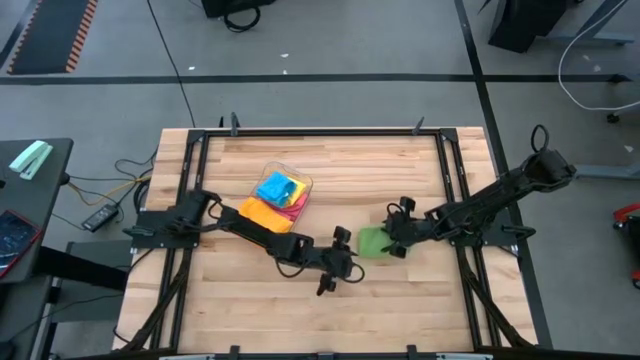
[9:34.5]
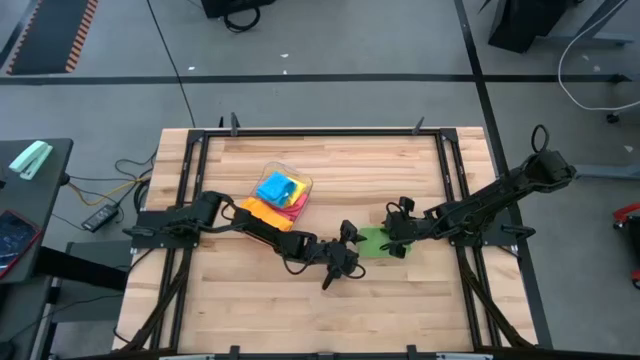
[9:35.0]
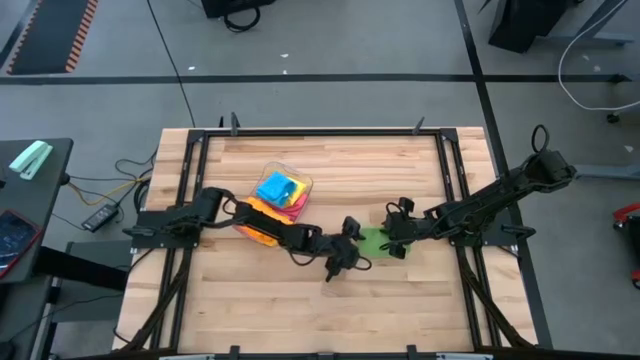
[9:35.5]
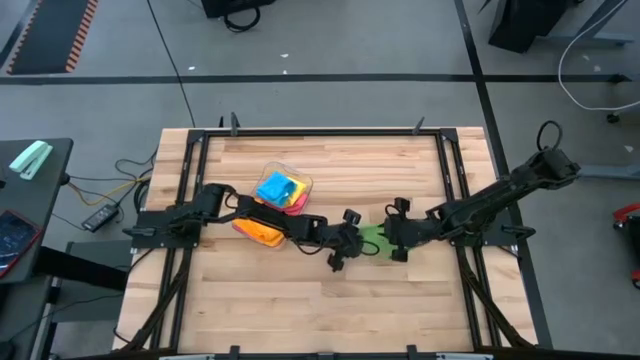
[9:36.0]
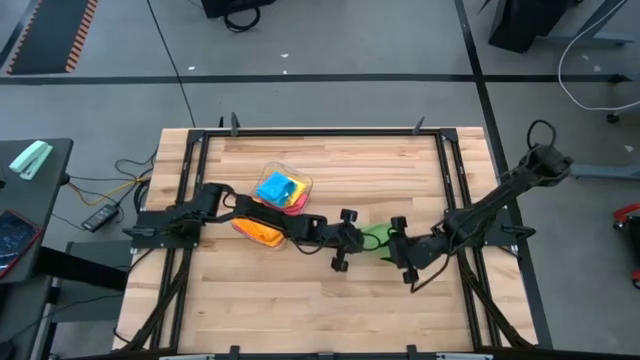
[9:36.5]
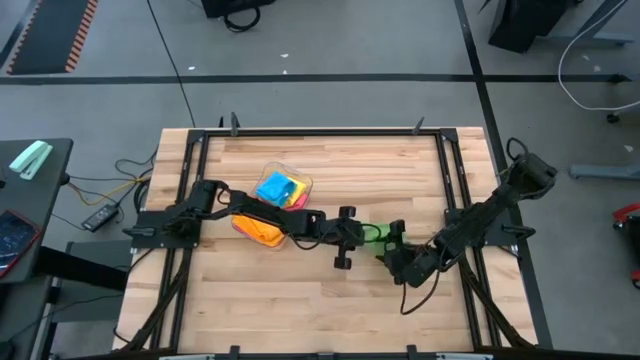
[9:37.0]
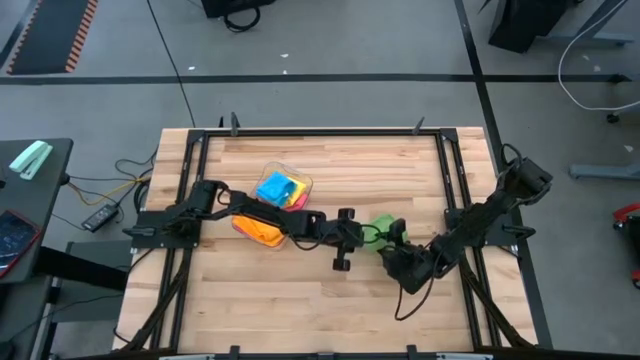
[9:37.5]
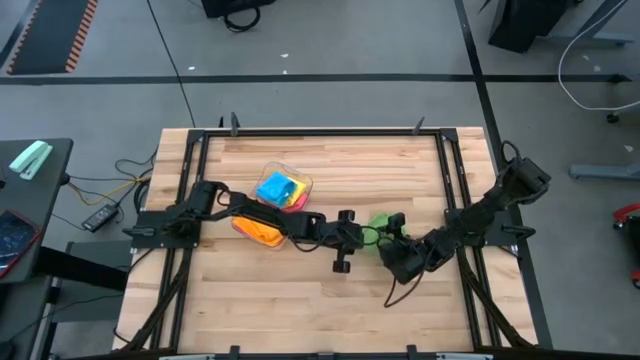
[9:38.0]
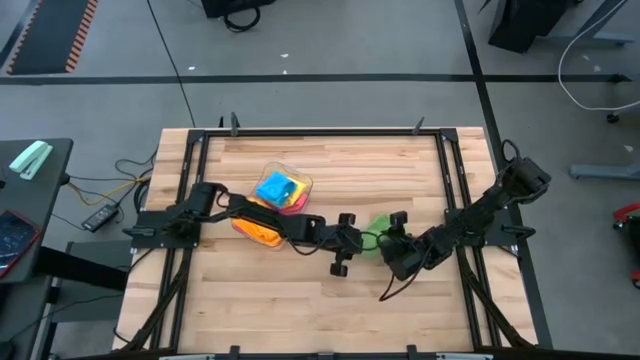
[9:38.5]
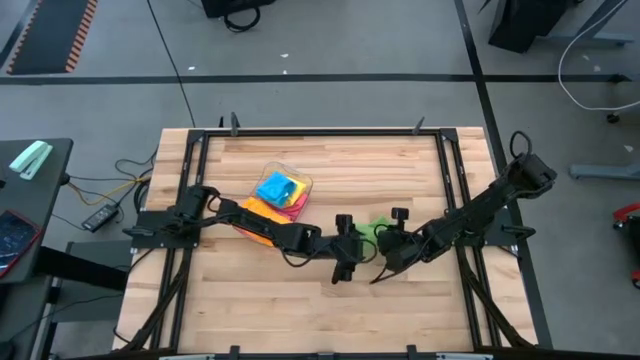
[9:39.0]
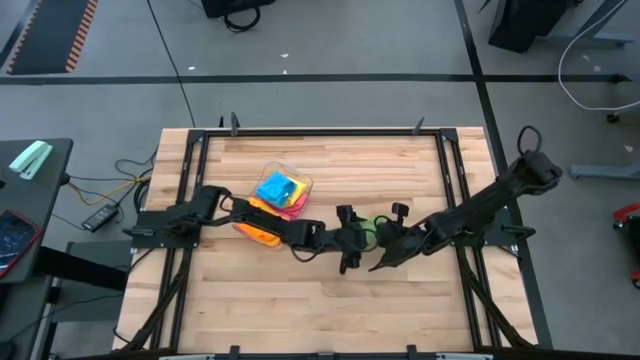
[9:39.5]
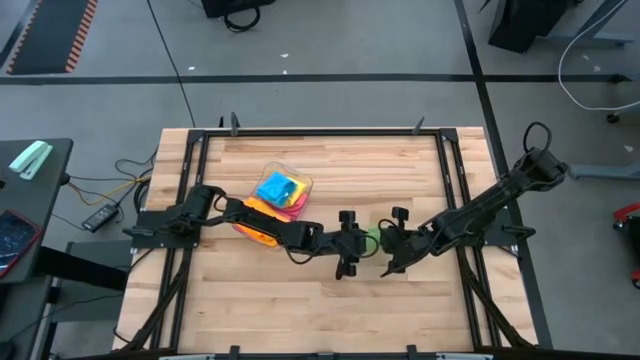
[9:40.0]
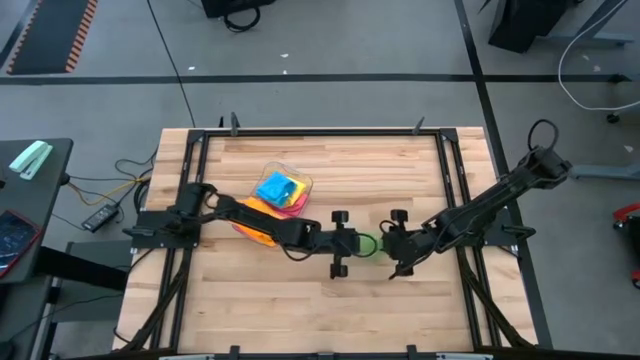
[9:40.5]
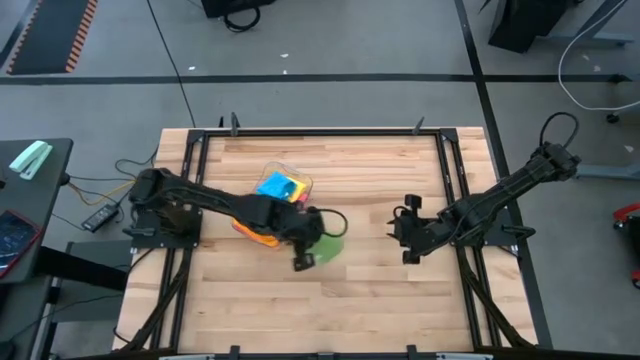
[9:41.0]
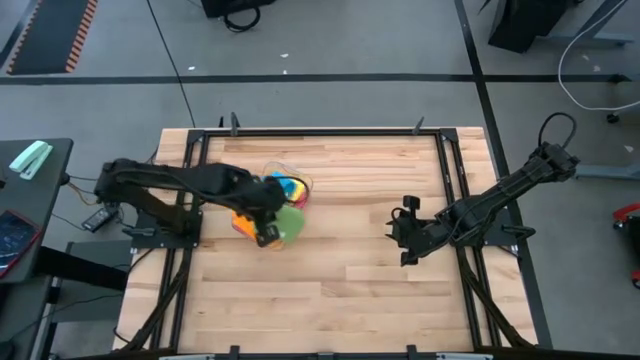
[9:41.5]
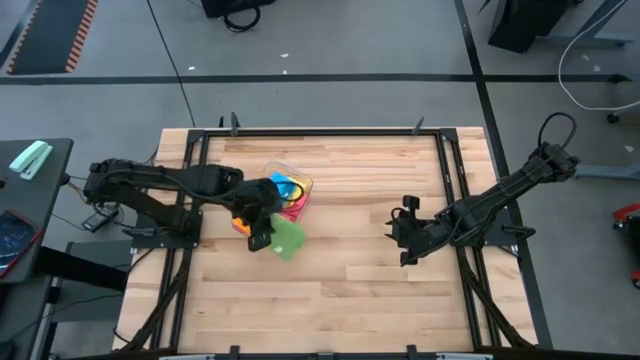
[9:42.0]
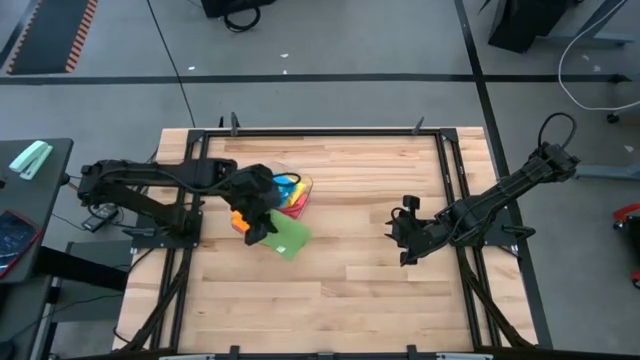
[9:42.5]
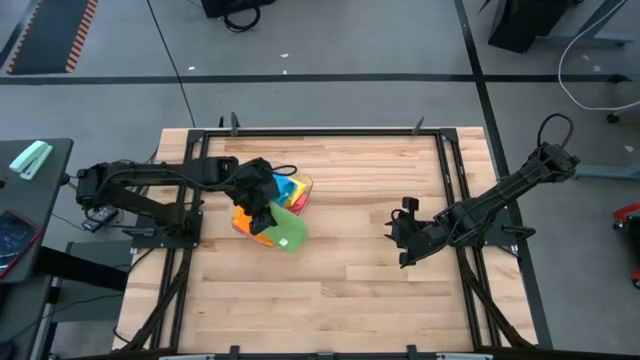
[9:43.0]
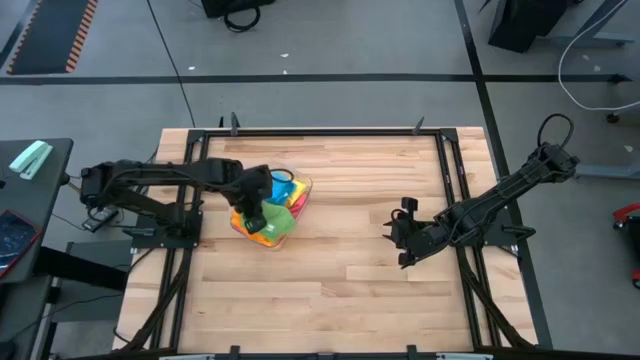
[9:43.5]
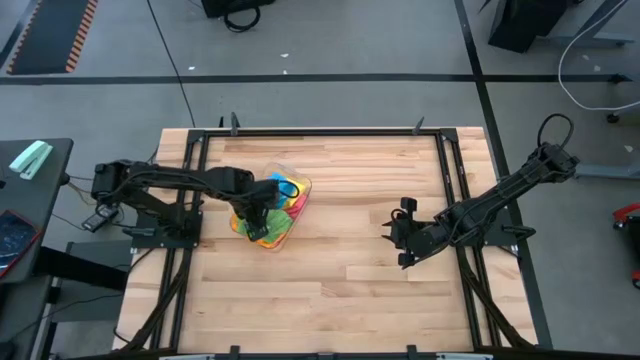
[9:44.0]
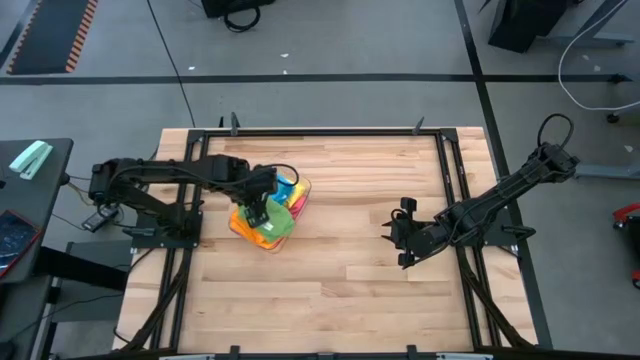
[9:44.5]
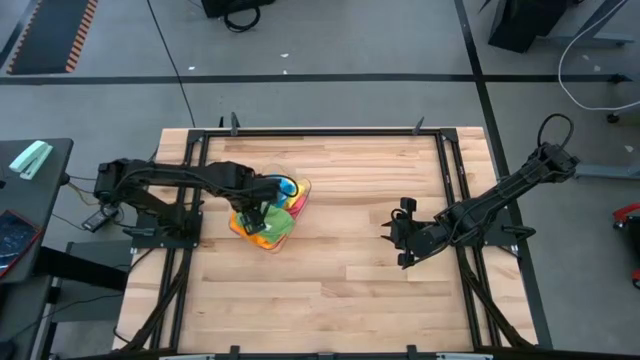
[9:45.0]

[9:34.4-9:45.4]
Task: Fold microfiber towels
Put the folded green microfiber towel into the transparent bin

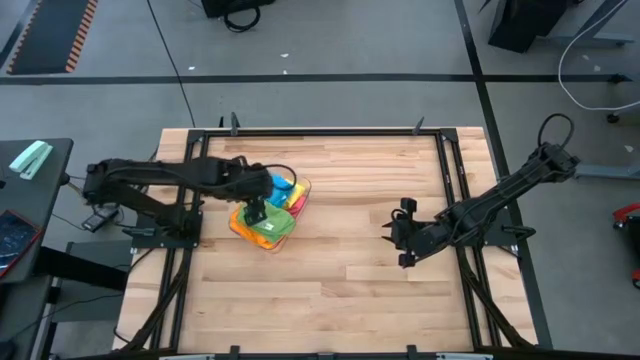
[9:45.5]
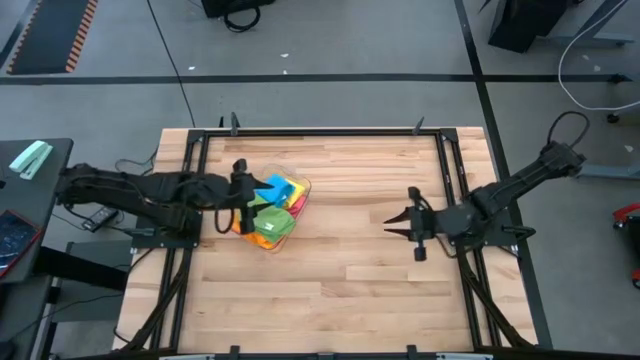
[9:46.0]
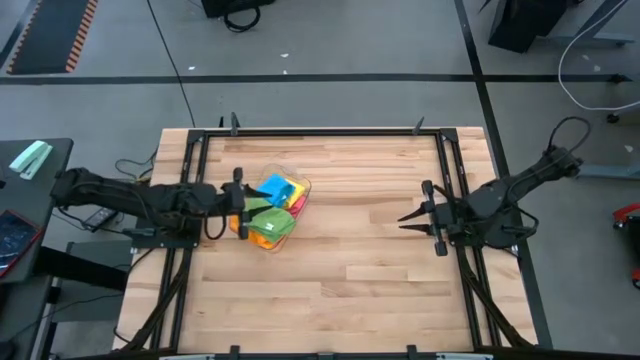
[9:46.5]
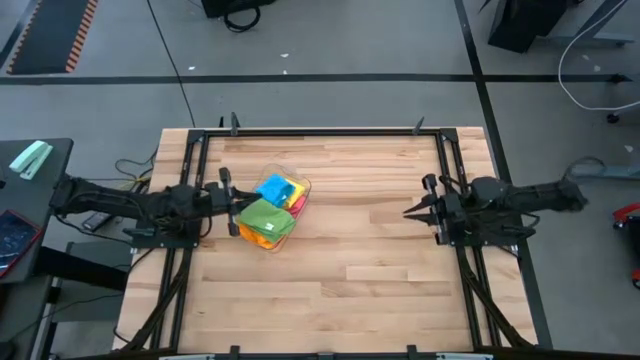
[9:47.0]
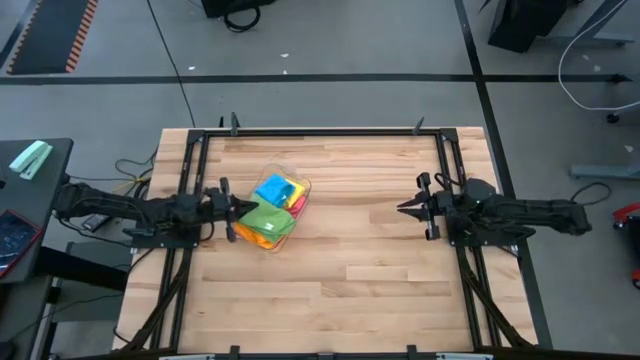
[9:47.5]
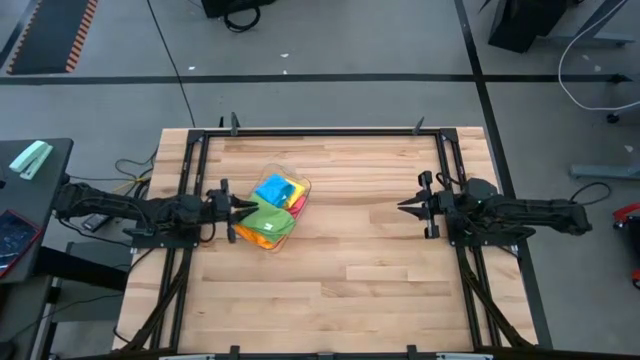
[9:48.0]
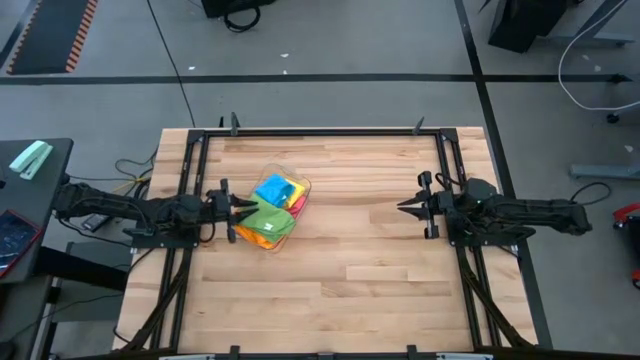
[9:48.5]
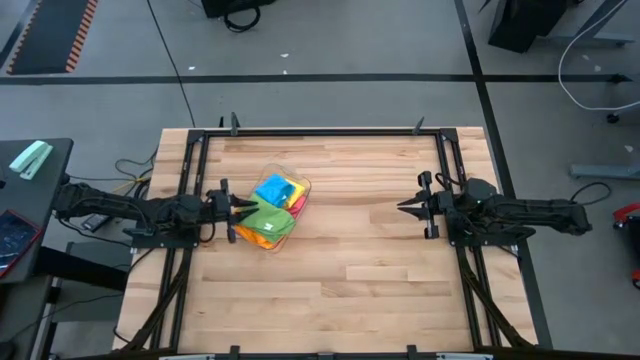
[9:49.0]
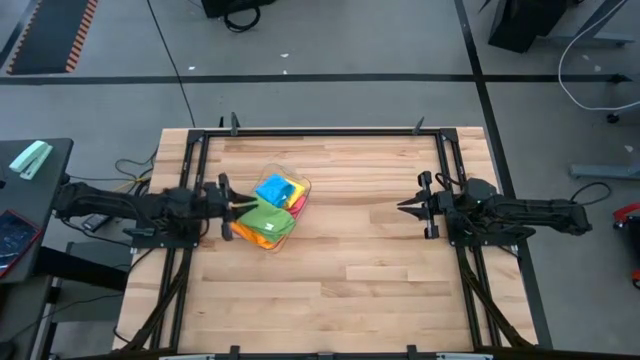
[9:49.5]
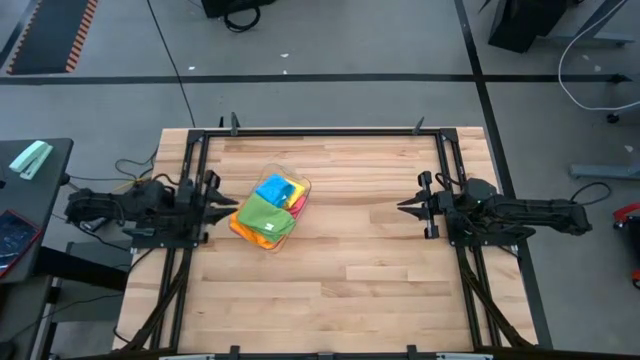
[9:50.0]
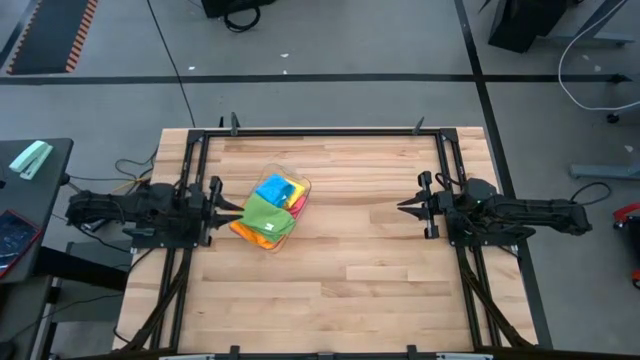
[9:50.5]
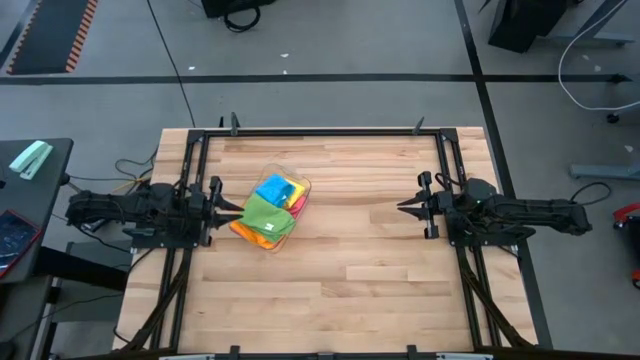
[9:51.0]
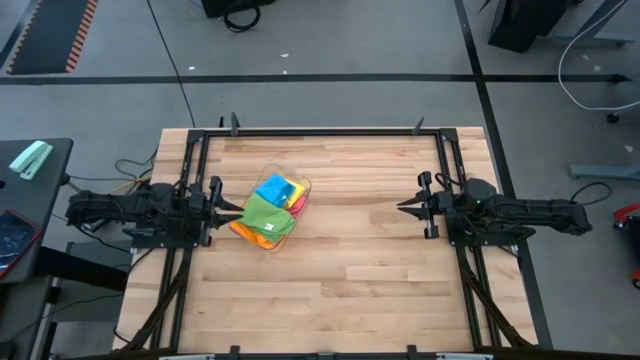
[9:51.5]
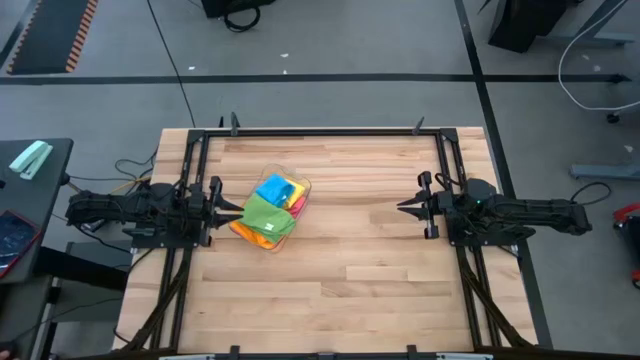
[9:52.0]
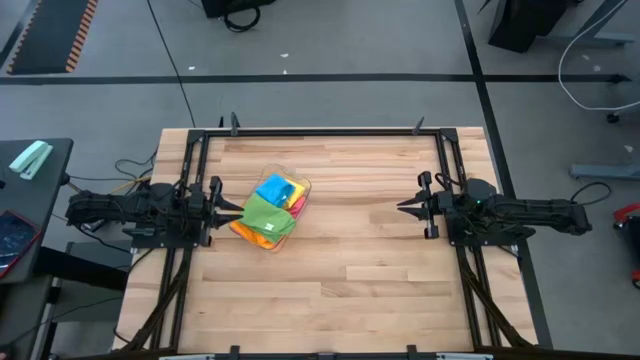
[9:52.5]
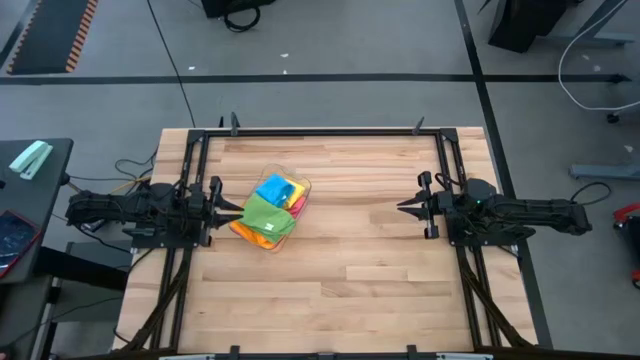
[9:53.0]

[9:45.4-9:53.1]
Return to Home Position
